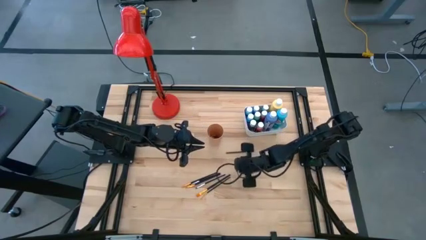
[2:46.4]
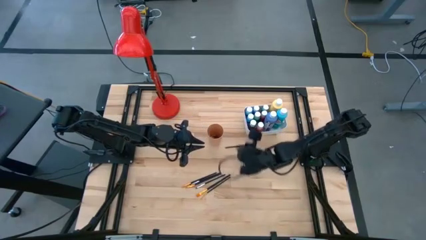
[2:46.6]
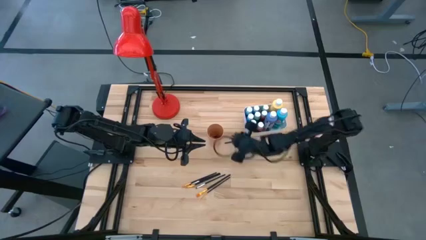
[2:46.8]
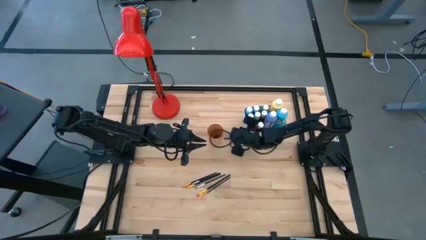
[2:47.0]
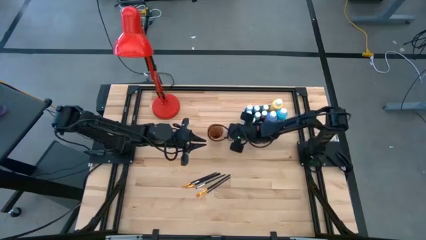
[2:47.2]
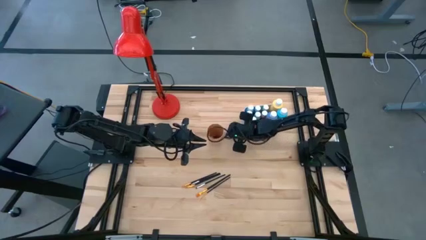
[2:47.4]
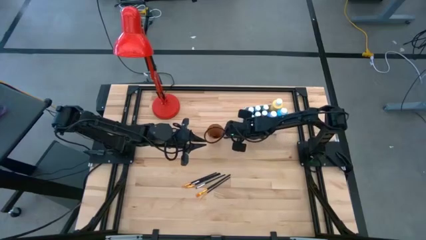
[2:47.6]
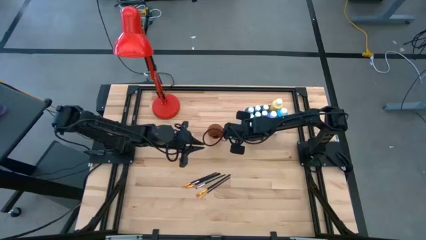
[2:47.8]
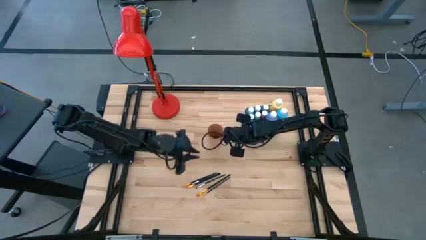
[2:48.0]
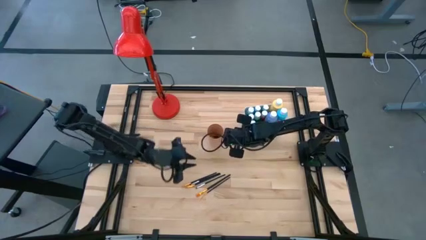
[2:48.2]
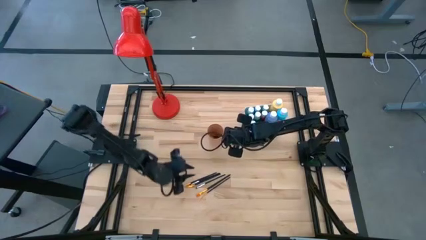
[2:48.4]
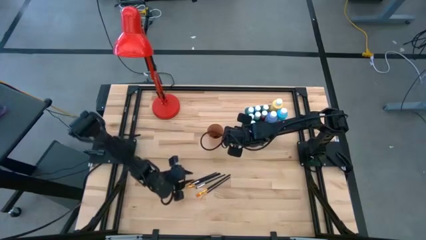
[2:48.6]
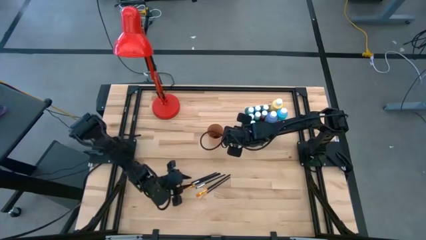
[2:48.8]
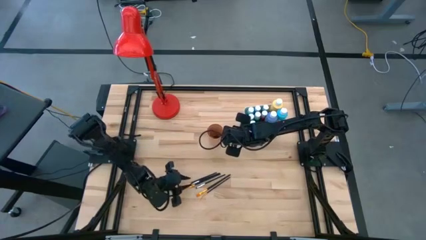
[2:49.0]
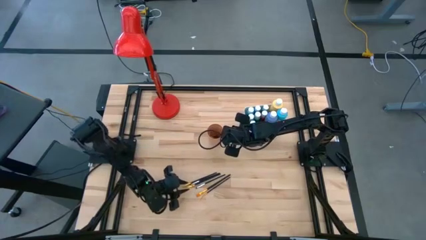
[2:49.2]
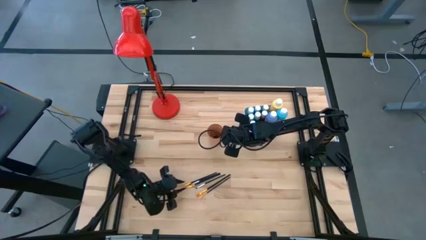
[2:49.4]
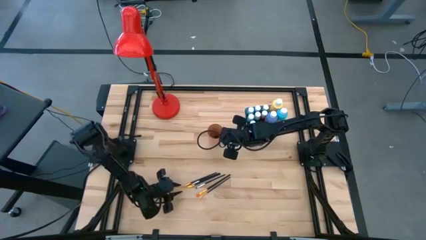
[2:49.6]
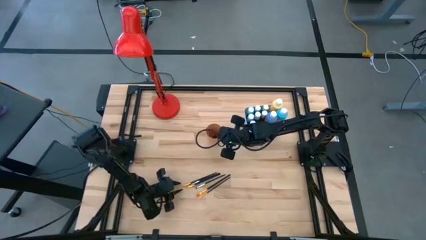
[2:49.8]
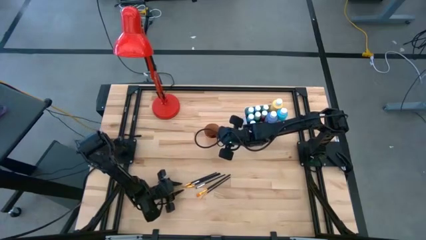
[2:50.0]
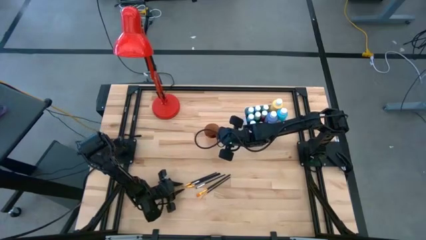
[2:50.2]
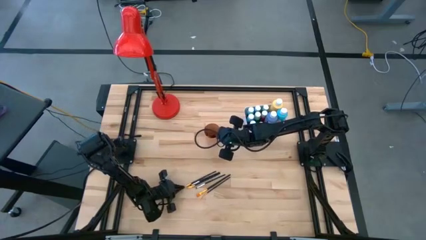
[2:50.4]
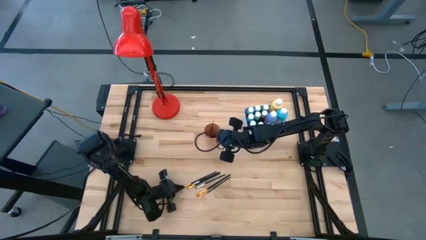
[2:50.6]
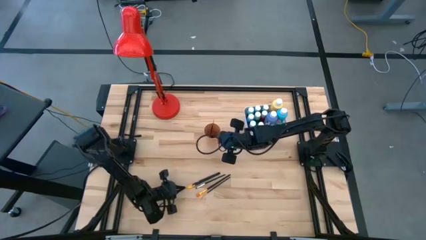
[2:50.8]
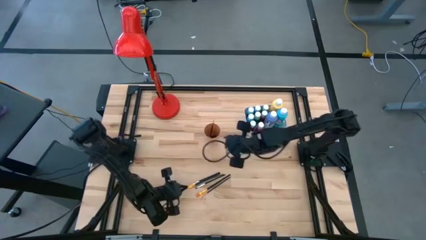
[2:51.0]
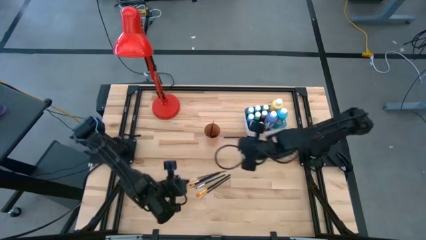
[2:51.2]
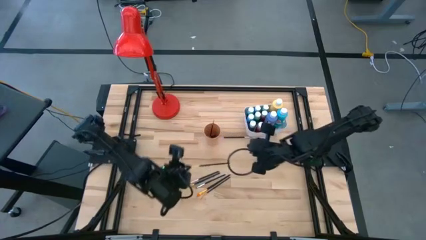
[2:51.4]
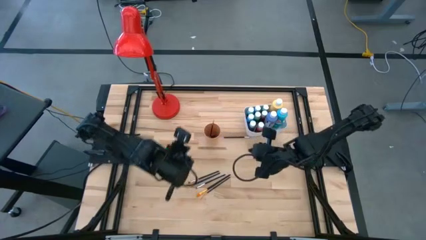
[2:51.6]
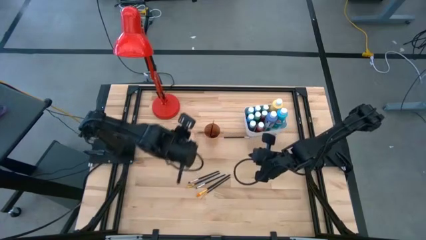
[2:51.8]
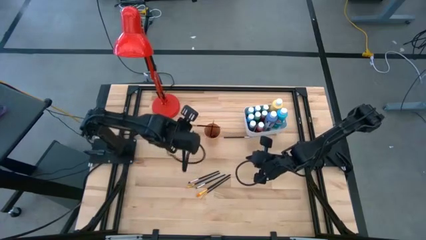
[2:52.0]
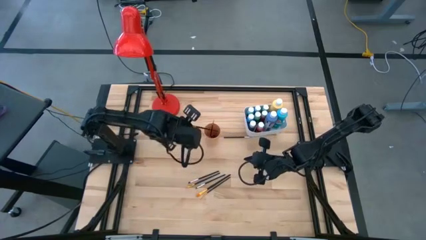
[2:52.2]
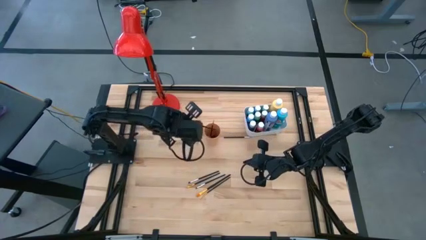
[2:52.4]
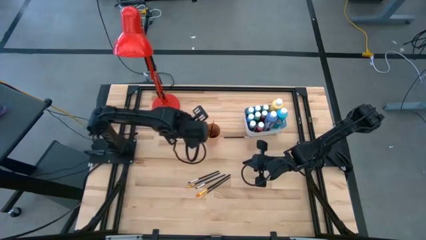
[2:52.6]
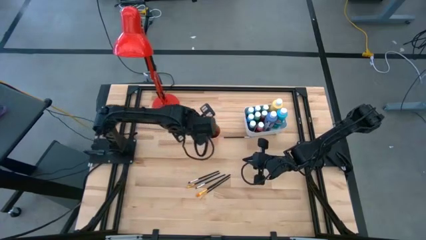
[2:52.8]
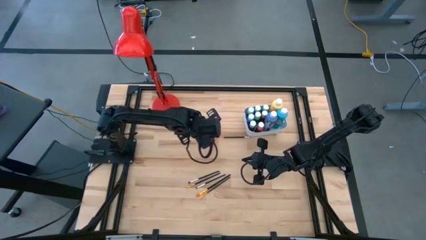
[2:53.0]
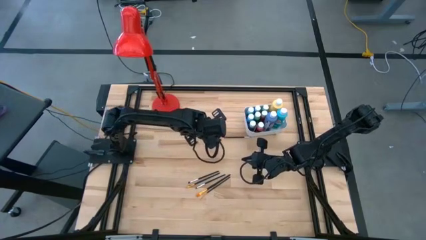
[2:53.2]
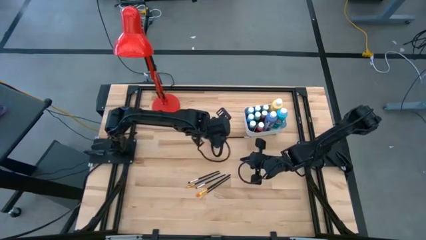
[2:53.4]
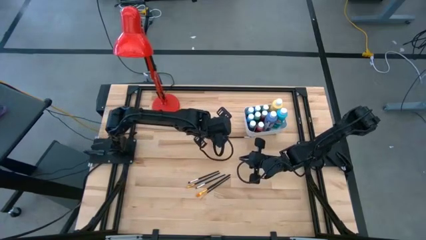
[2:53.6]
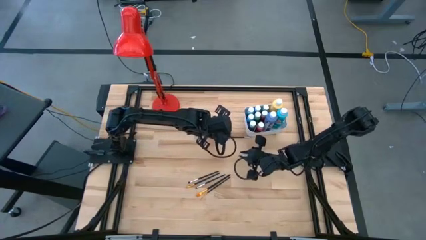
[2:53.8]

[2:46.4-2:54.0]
Task: Pick & Place Paint Supplies
Put the orange paint brush into the orange cup

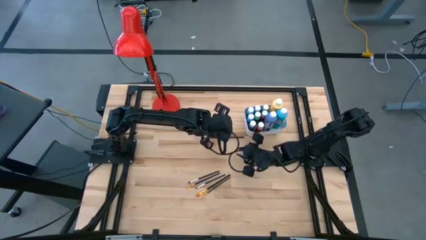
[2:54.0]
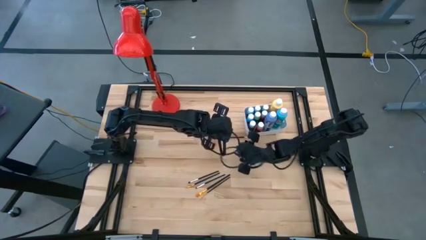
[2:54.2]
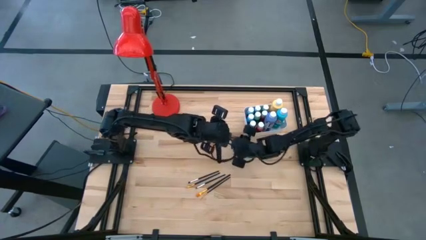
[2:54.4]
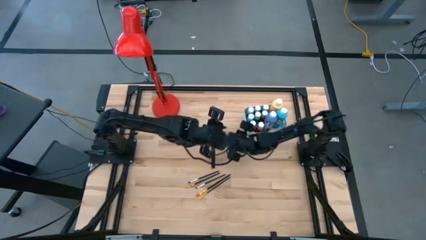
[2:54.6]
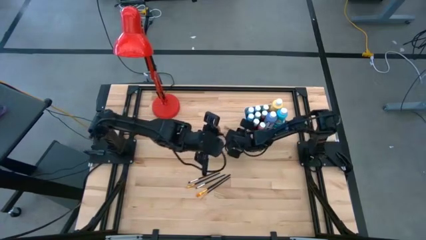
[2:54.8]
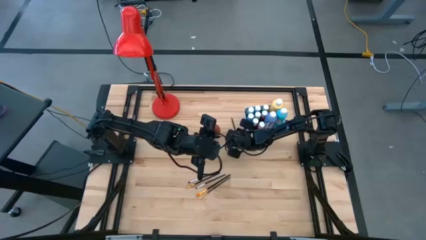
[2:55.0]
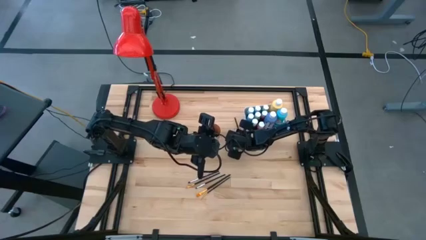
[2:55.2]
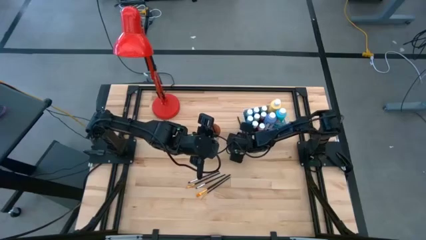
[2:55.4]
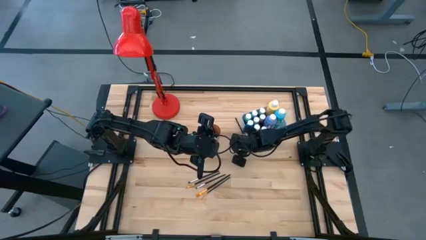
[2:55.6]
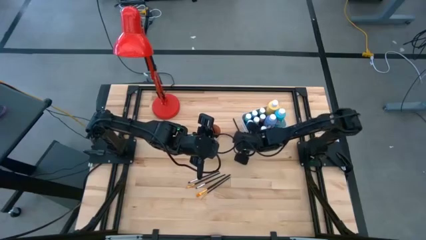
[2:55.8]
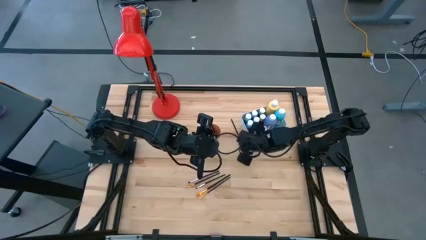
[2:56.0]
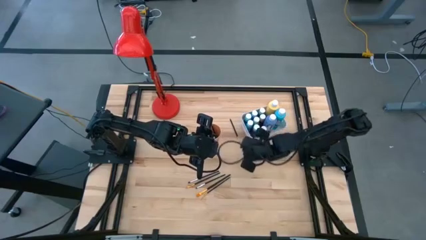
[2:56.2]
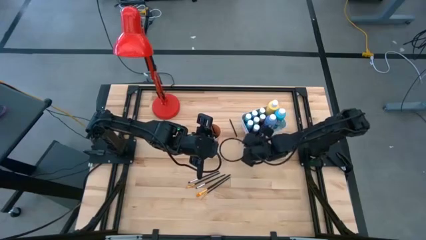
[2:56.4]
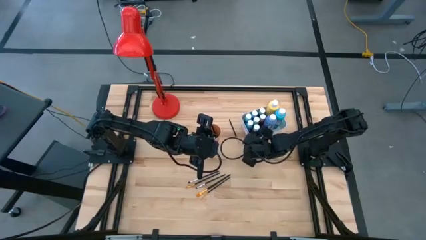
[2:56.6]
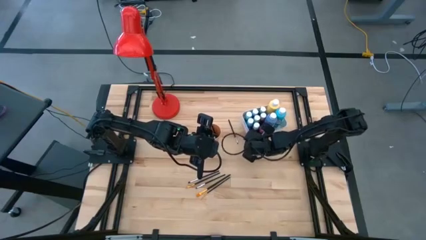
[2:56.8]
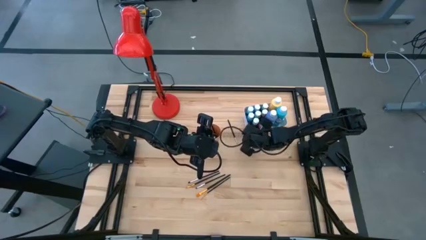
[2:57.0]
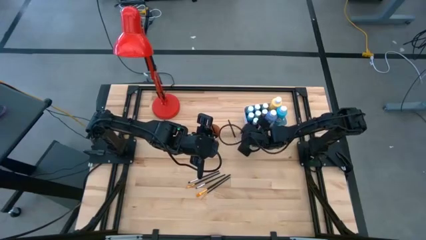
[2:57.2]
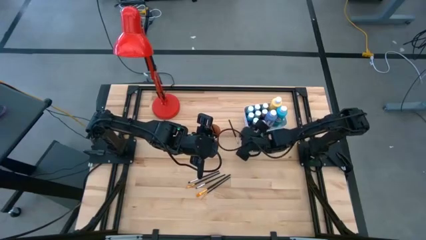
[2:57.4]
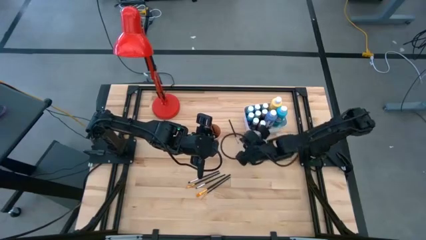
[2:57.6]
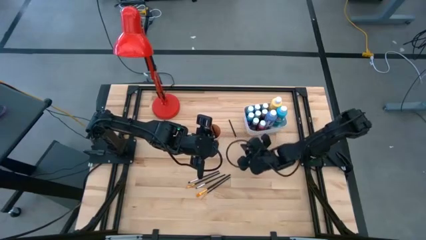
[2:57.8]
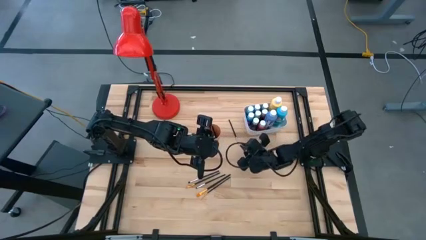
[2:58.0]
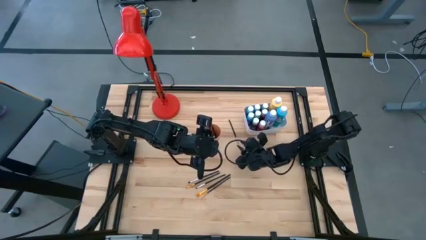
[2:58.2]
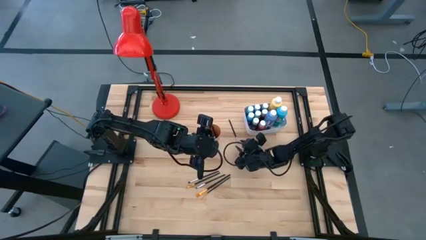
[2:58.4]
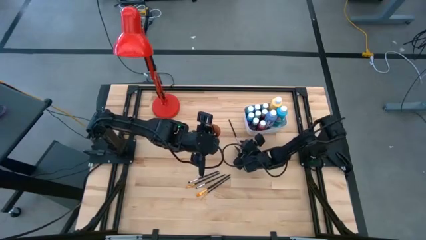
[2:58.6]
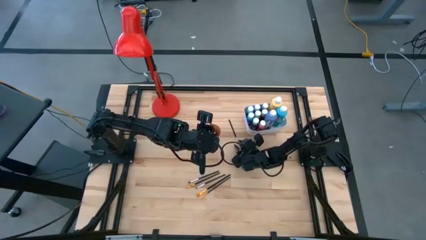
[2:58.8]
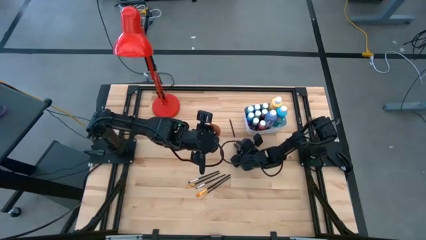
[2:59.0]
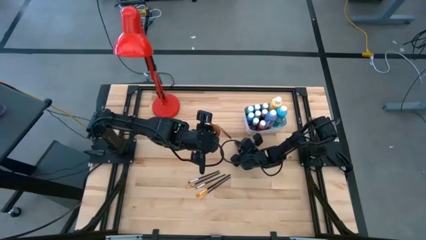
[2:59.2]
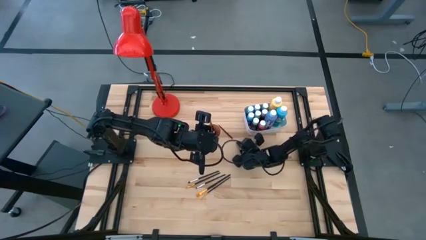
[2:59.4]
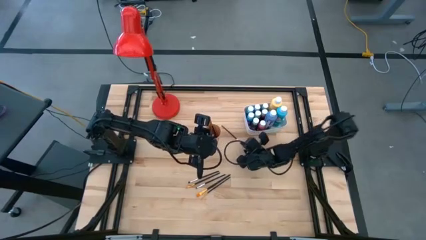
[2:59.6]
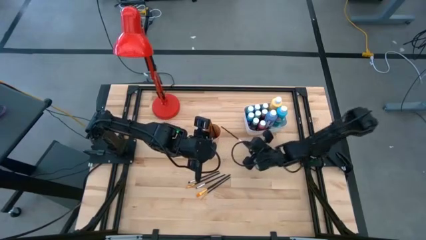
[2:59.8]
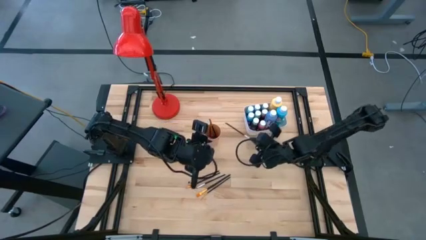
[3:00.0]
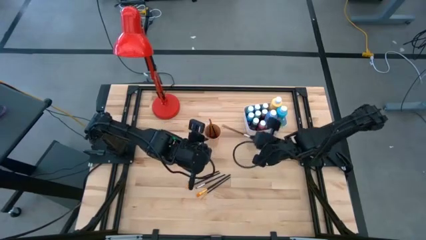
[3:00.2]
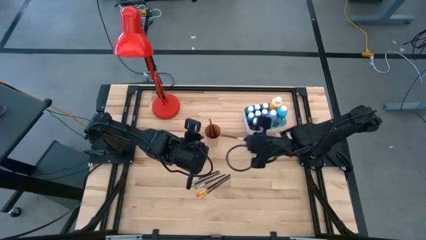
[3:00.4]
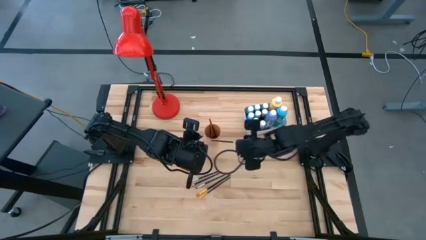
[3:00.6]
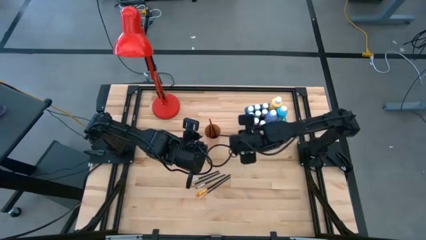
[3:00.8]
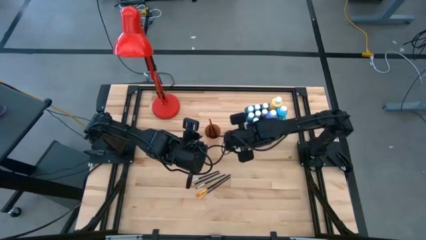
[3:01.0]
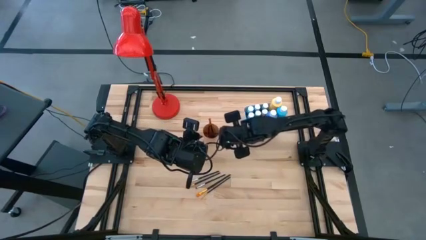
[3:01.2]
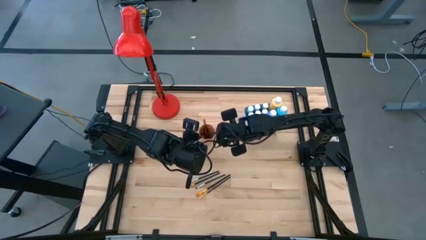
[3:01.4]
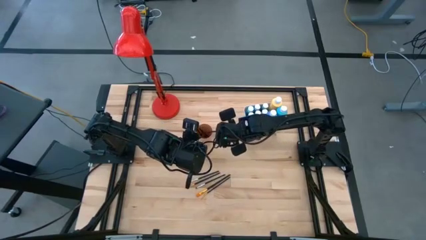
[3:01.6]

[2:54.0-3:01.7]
Put the white paint brush into the orange cup
